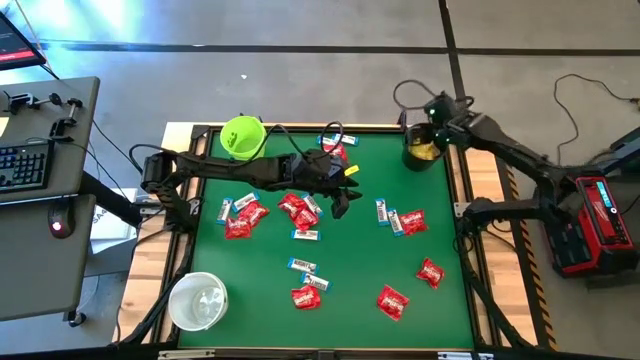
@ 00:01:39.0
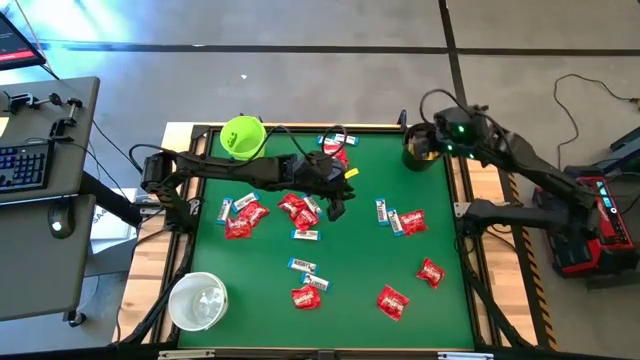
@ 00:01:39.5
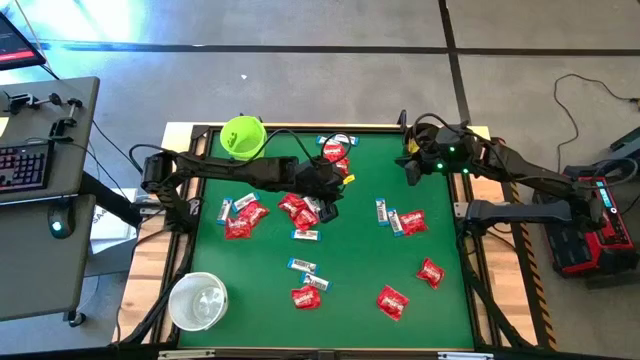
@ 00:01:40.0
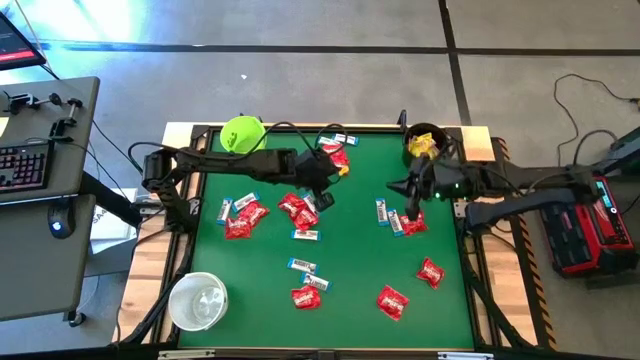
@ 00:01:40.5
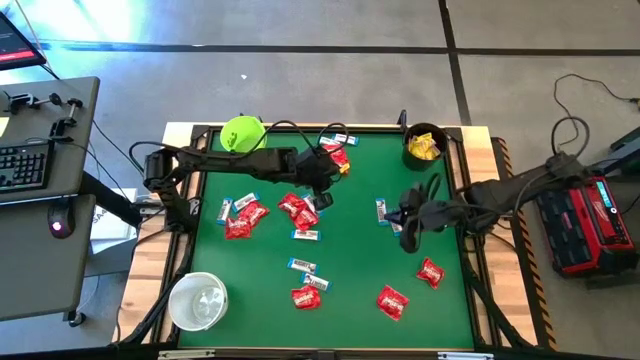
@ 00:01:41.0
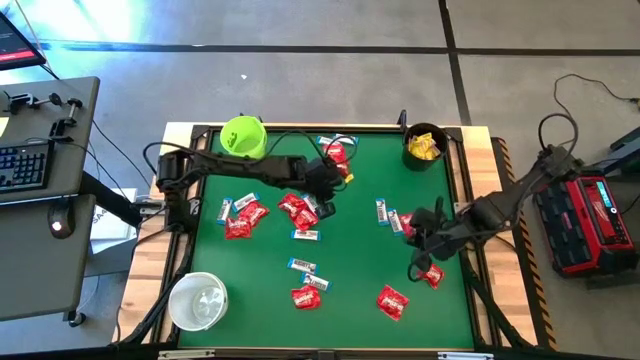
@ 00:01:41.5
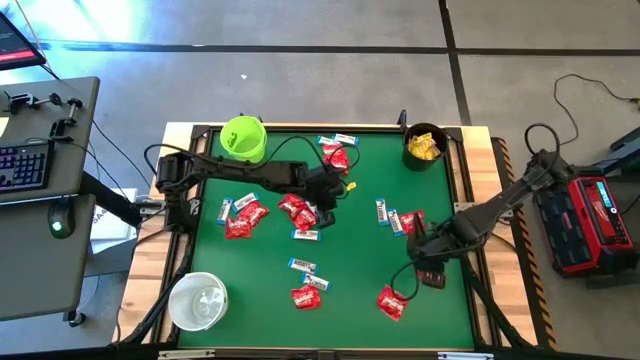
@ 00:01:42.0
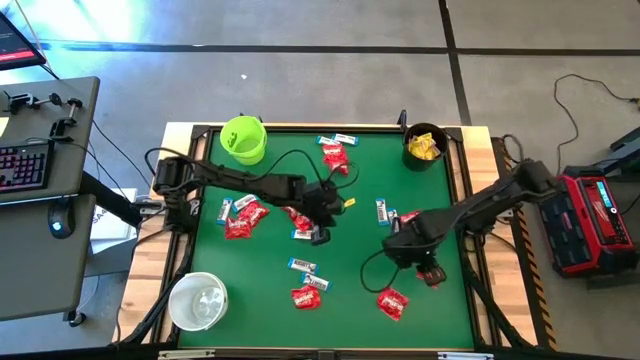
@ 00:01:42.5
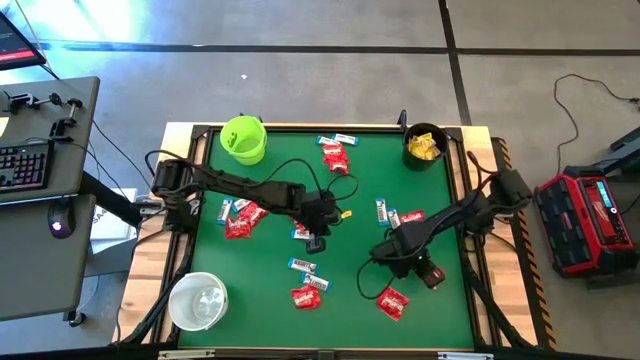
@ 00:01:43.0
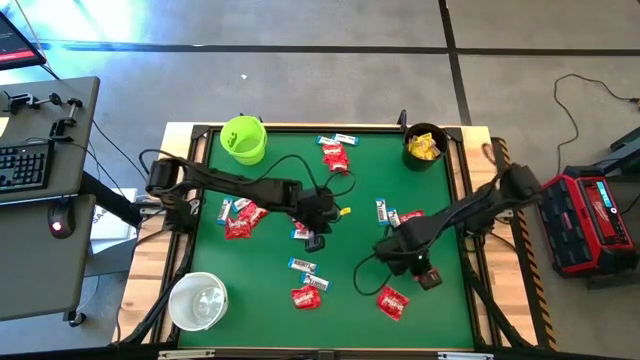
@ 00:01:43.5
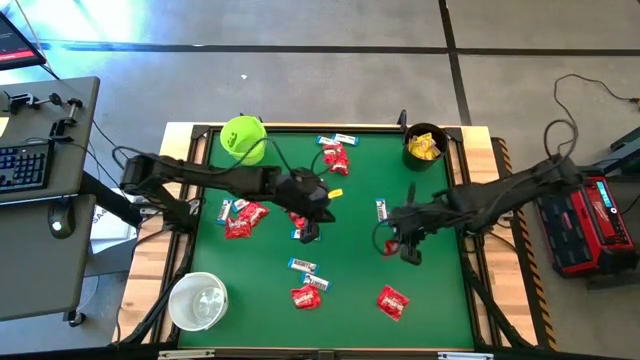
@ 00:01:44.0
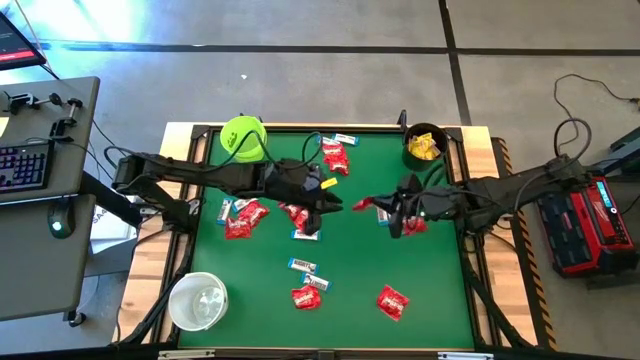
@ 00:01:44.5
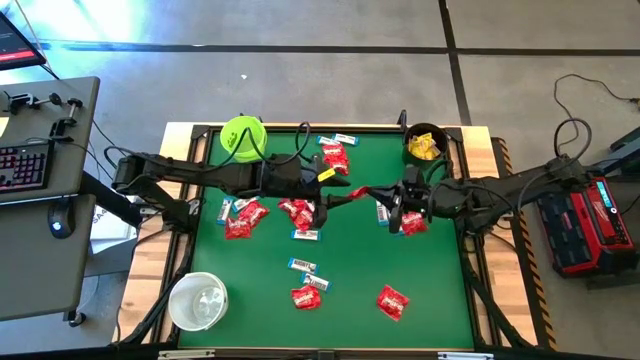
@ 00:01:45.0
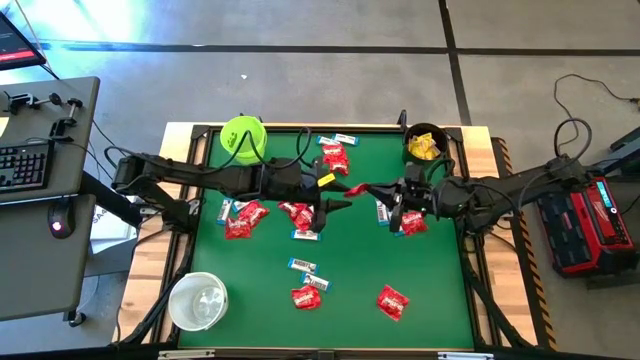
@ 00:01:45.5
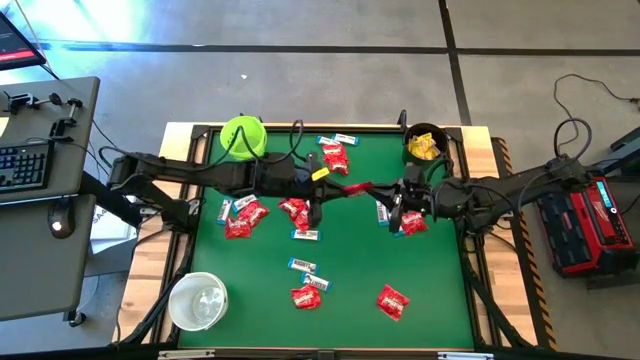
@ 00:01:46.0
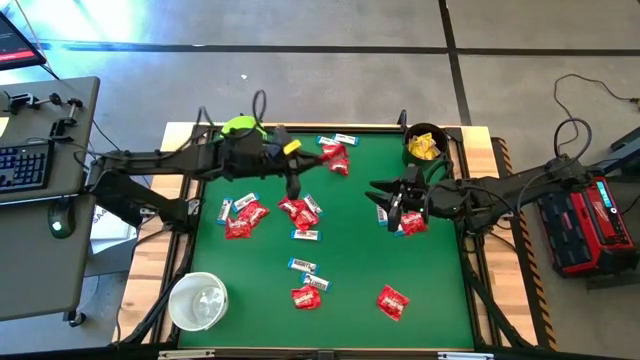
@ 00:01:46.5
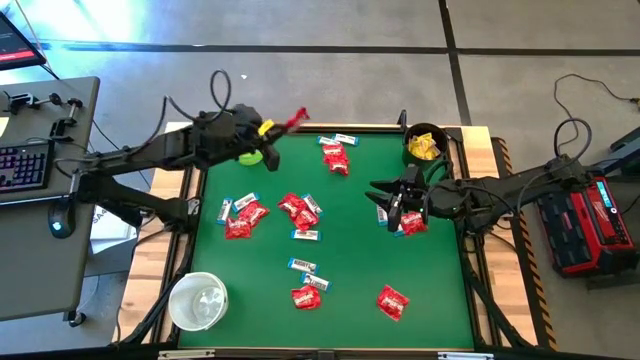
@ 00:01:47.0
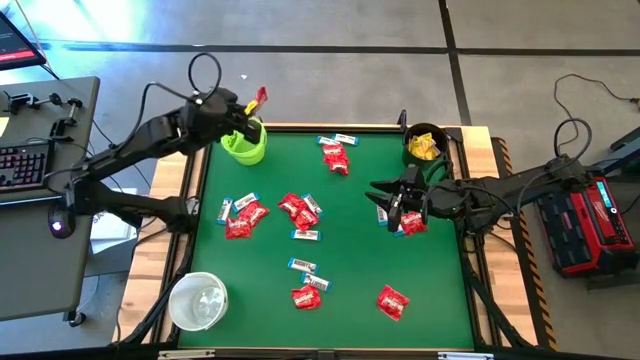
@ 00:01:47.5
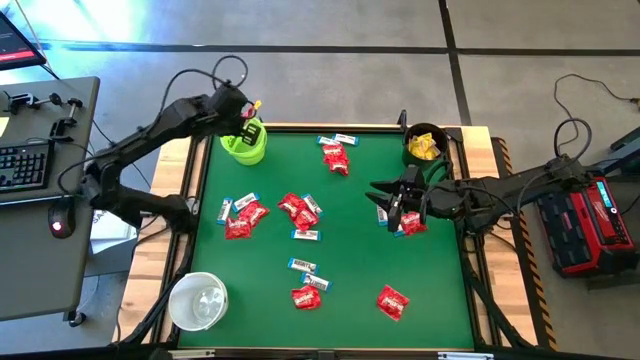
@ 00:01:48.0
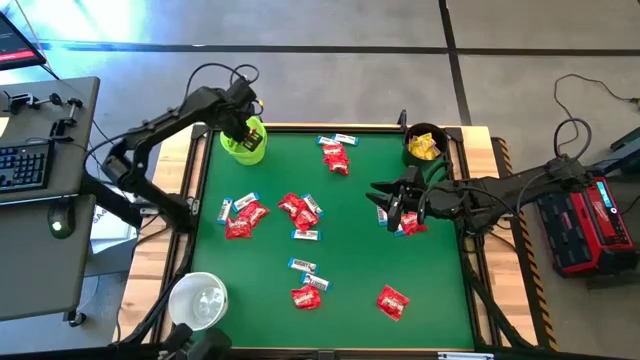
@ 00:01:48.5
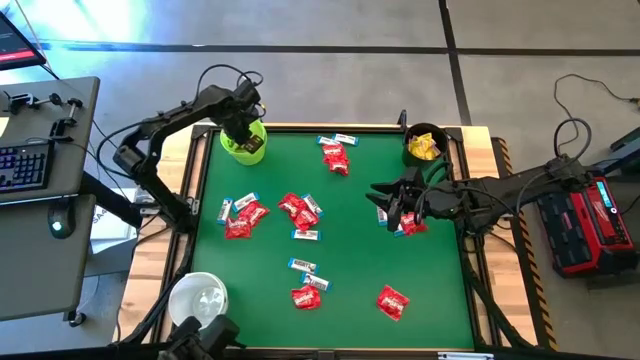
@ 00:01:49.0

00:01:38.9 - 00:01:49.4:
Task: Sort candy by brand, put in halloween buckets
Put the red candy into the green bucket

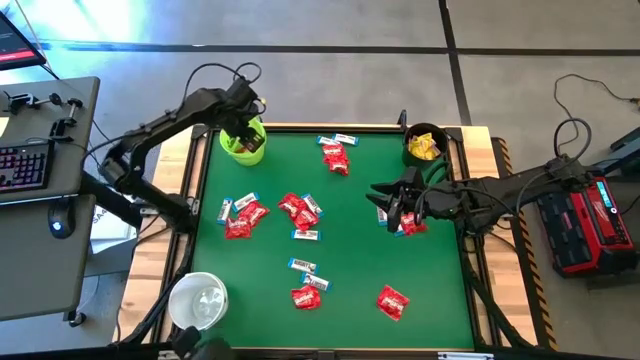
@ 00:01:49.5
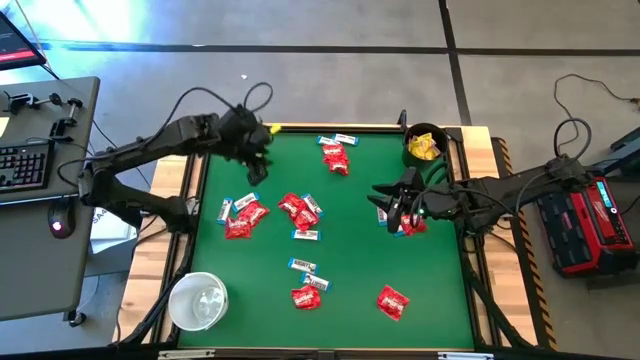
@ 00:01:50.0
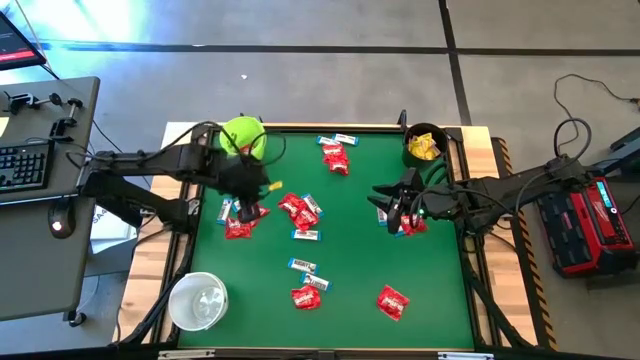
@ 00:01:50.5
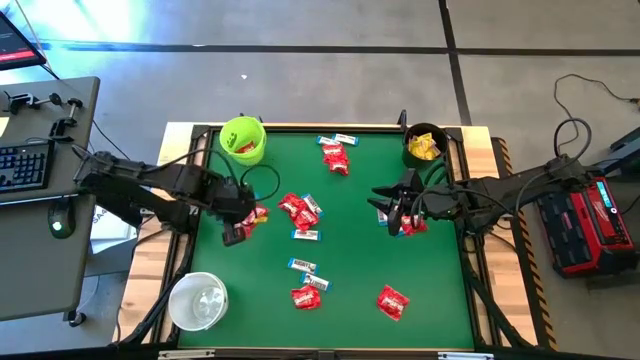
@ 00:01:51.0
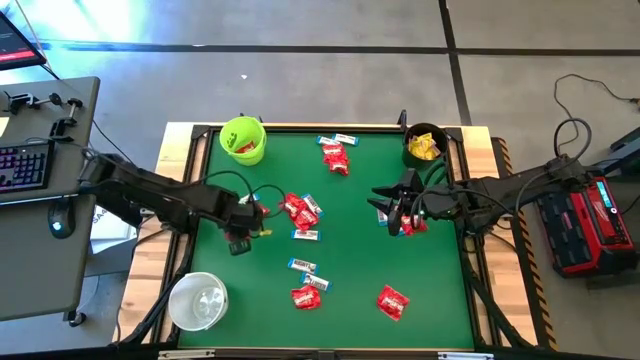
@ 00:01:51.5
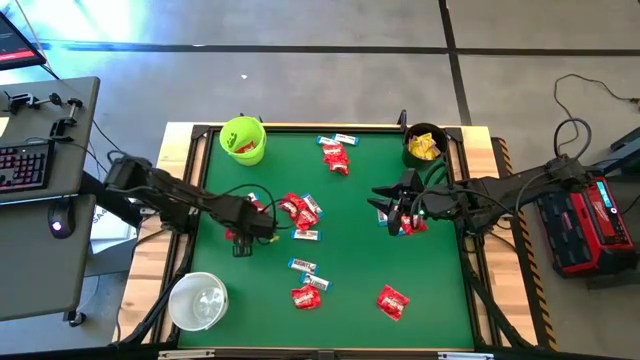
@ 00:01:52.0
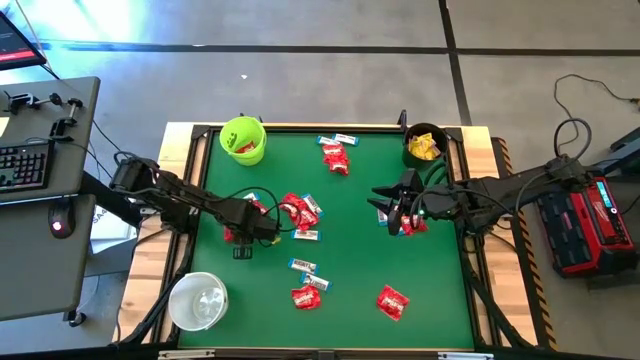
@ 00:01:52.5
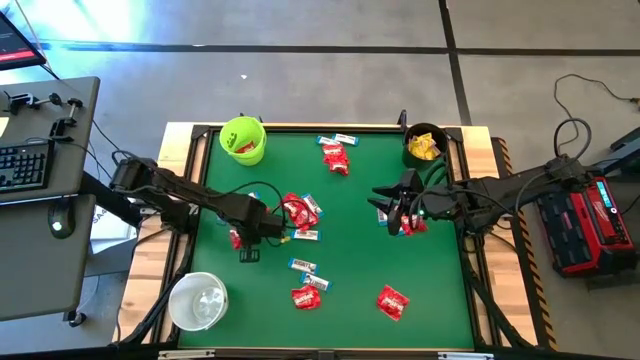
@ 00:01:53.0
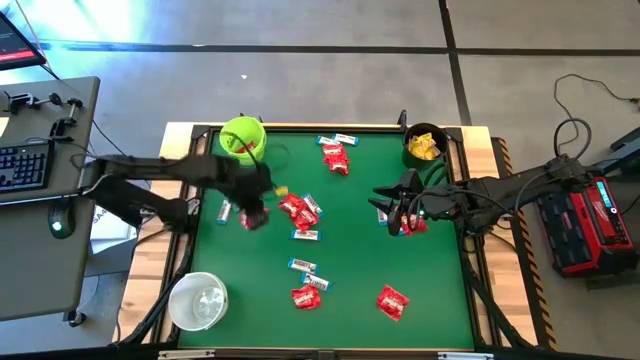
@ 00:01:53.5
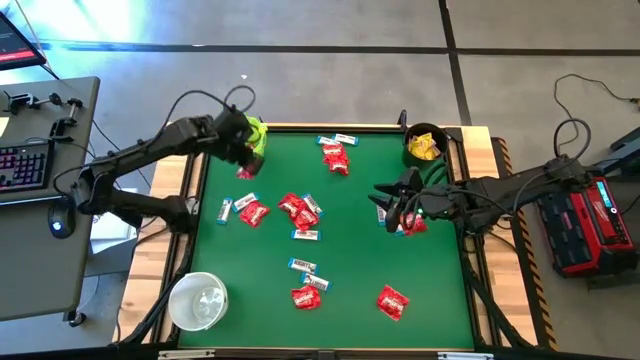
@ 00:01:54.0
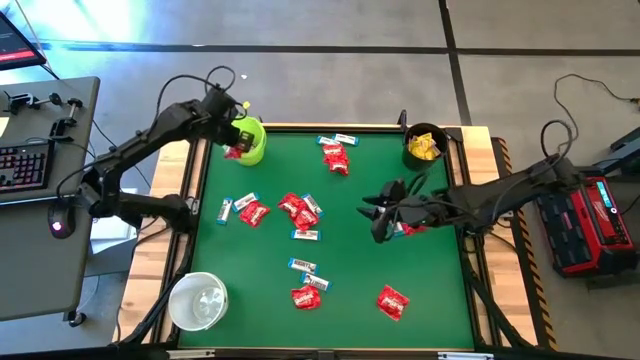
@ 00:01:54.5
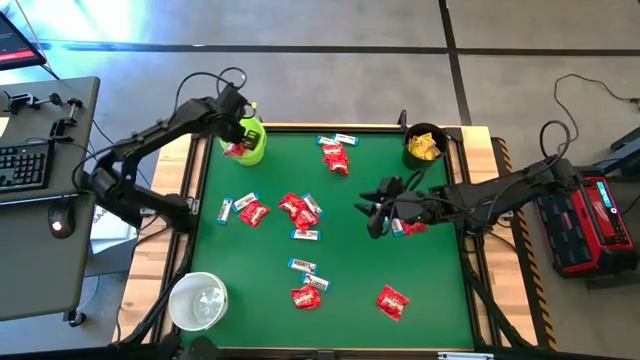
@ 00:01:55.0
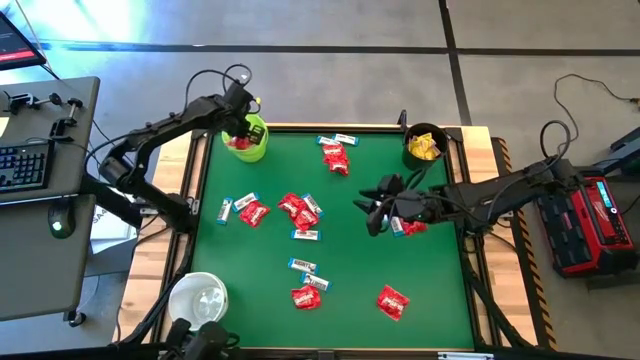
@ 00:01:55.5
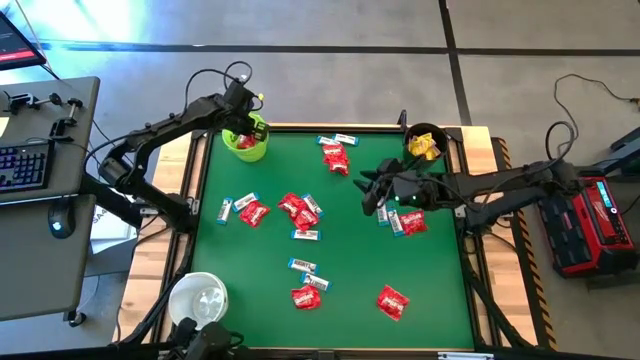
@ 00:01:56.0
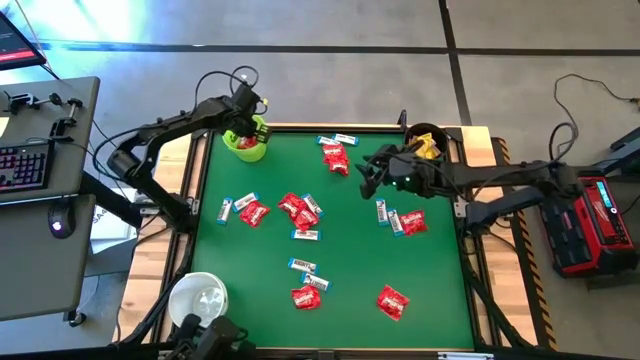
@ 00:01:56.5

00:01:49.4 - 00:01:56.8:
Put the red candy into the green bucket

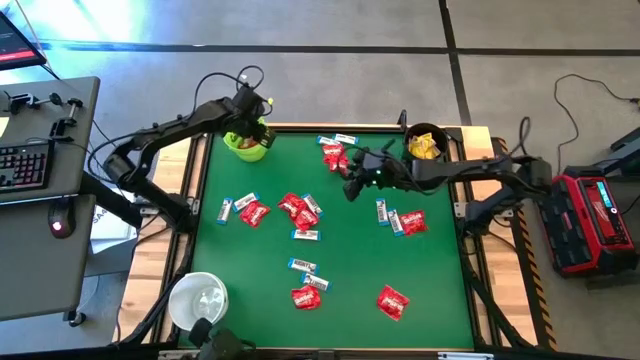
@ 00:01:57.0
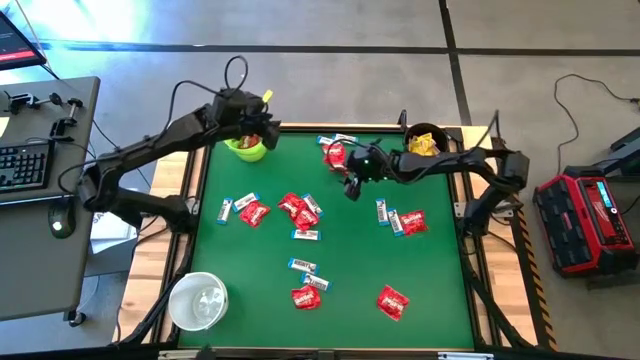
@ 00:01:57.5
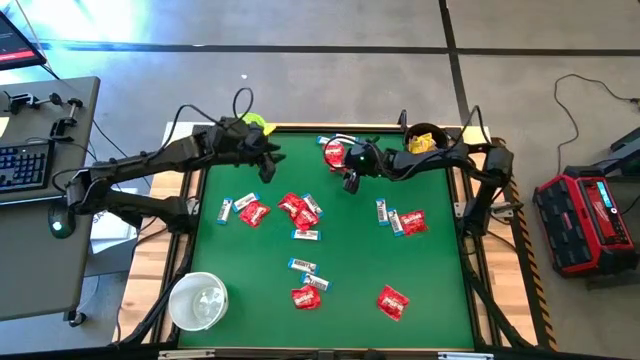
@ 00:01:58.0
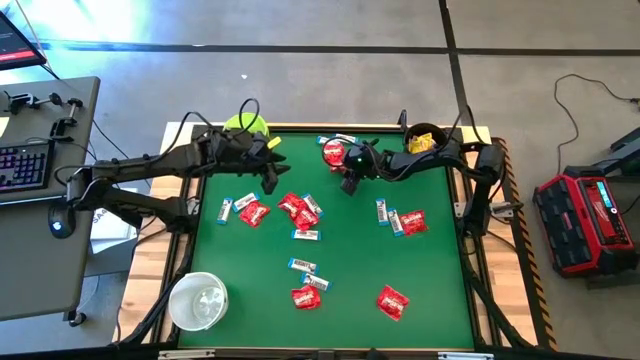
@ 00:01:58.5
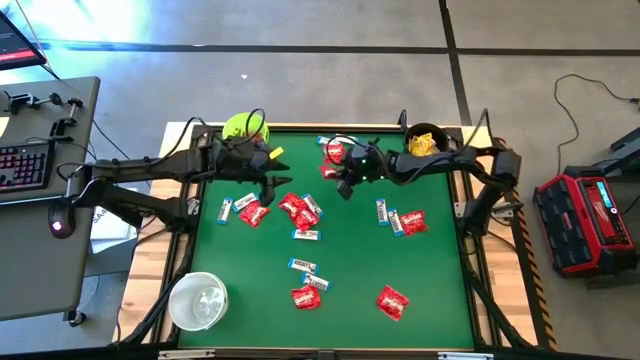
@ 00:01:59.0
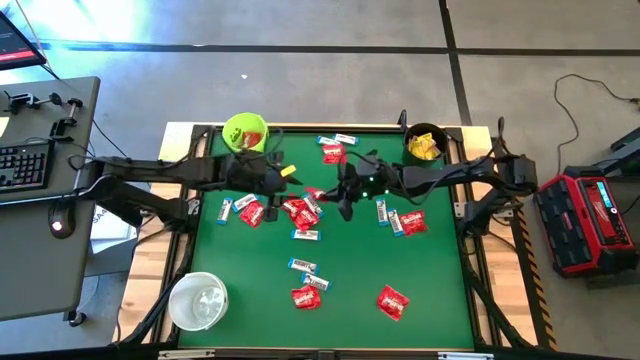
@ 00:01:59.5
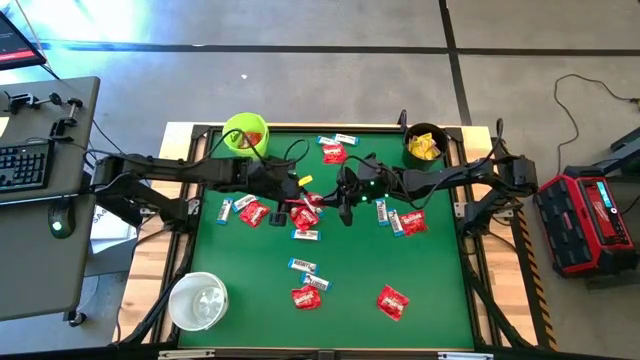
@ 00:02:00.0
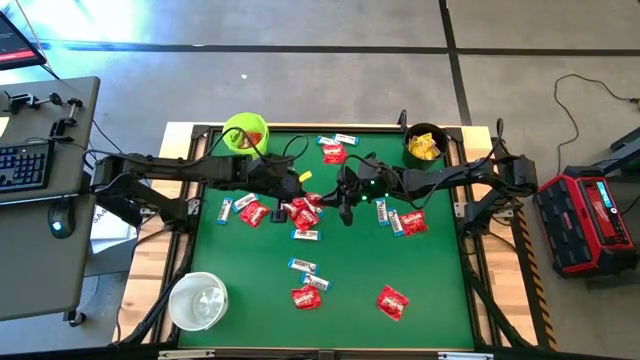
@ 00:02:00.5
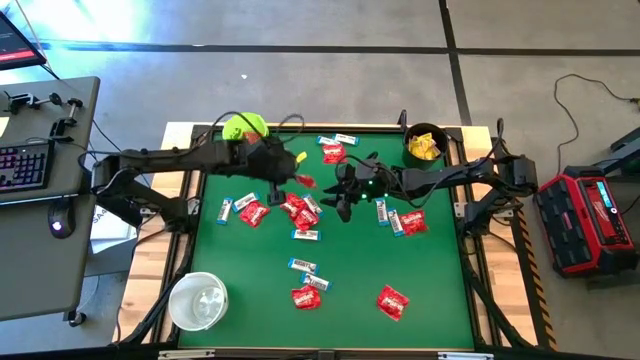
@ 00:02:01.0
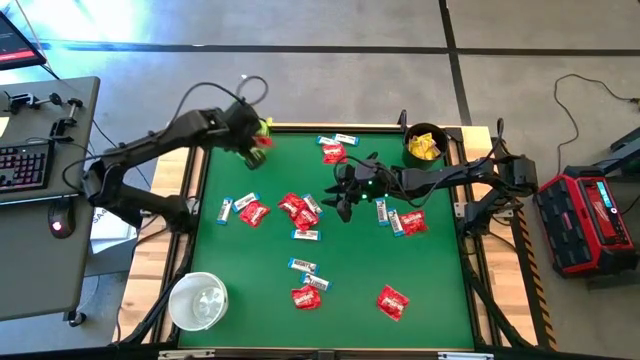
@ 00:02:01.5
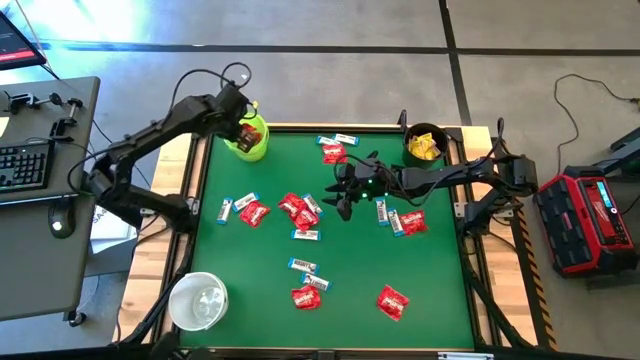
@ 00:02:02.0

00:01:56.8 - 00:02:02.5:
Put the red candy into the green bucket
